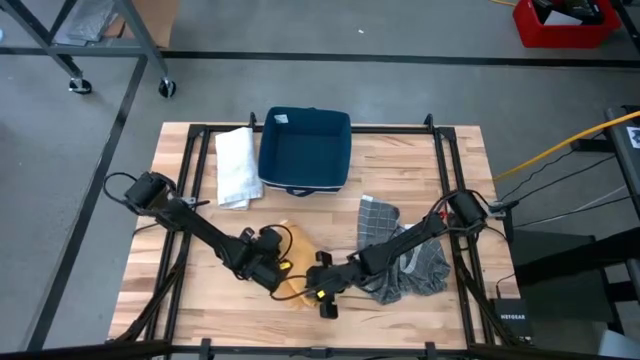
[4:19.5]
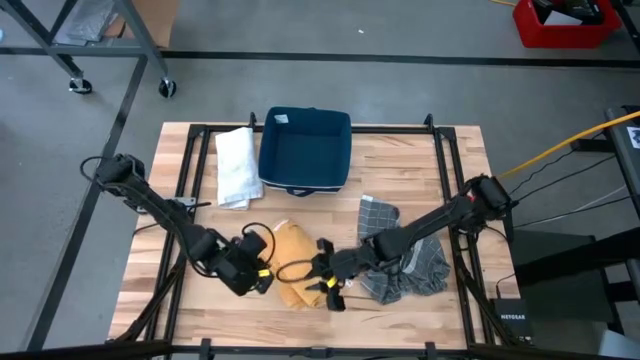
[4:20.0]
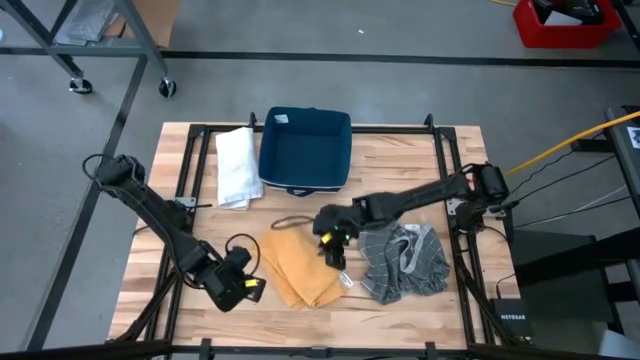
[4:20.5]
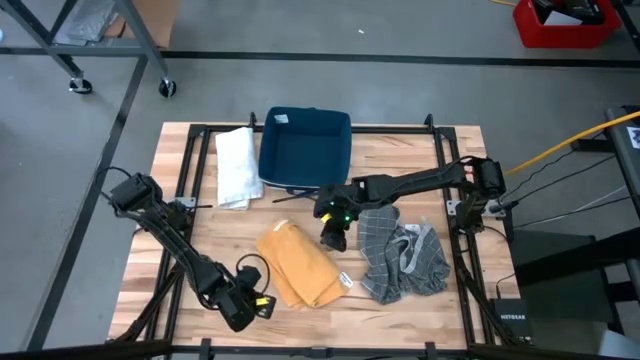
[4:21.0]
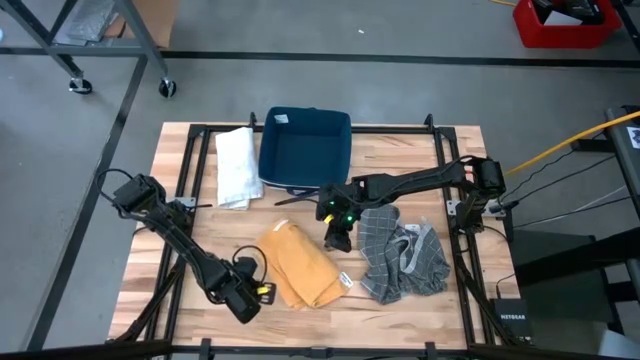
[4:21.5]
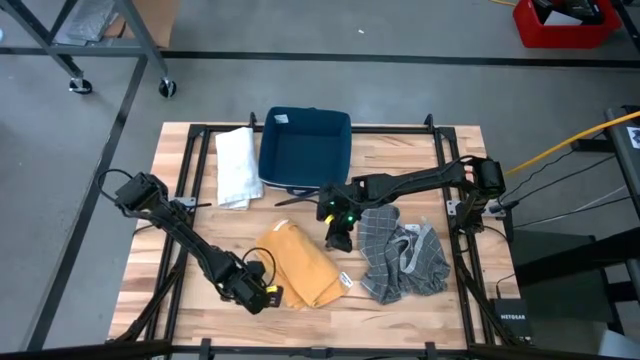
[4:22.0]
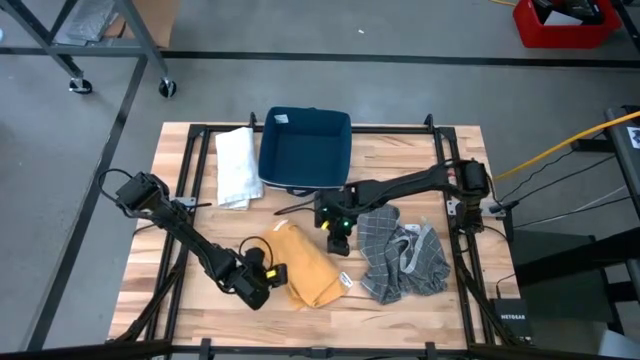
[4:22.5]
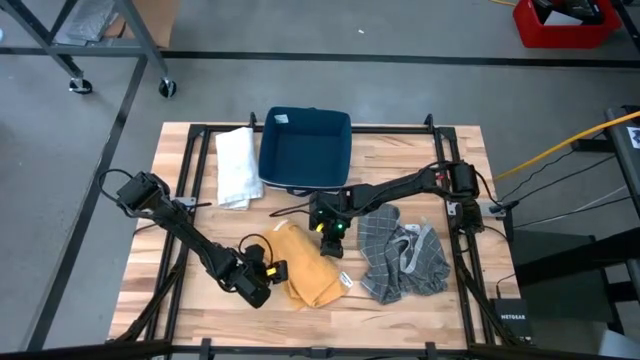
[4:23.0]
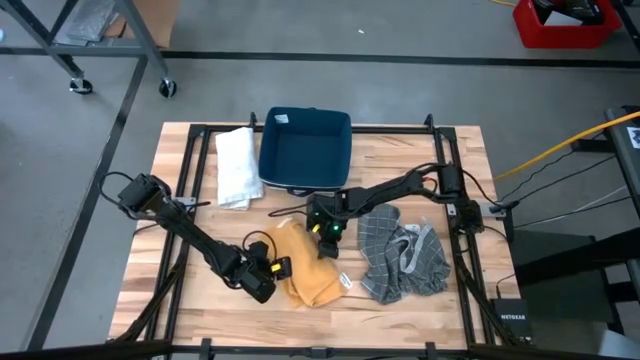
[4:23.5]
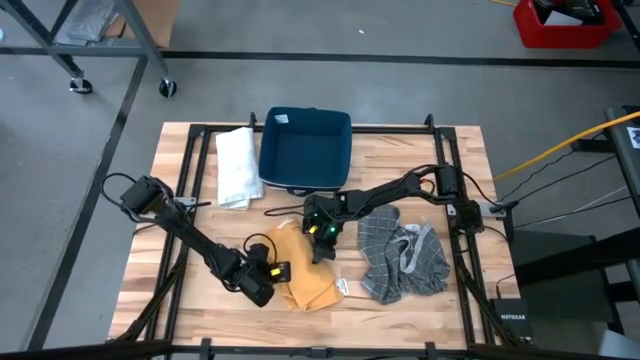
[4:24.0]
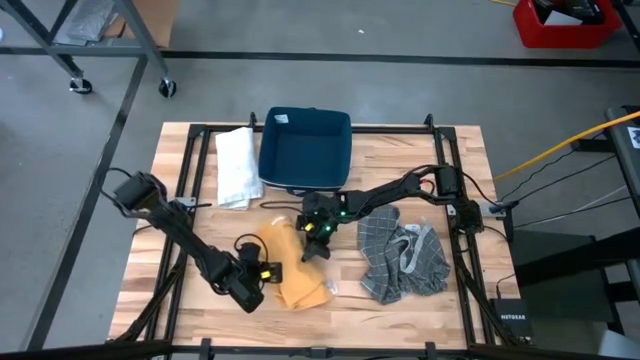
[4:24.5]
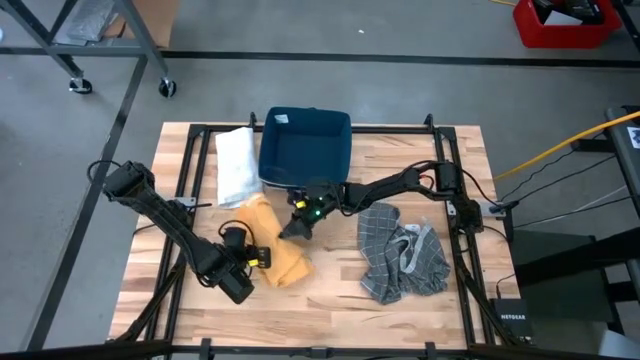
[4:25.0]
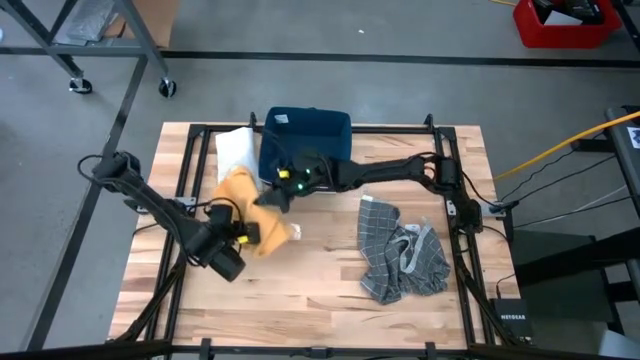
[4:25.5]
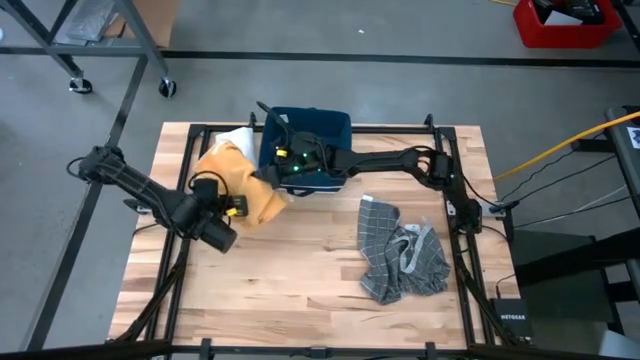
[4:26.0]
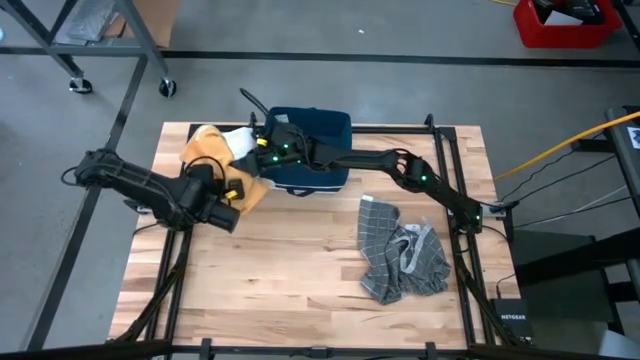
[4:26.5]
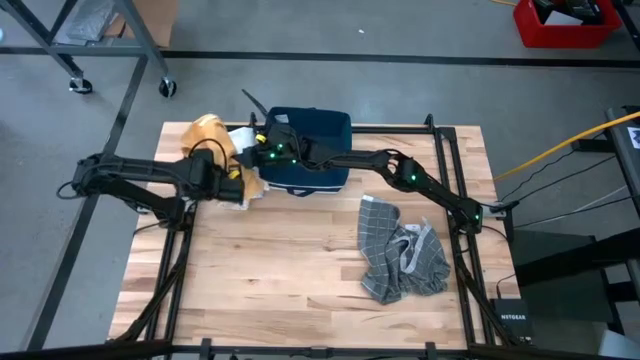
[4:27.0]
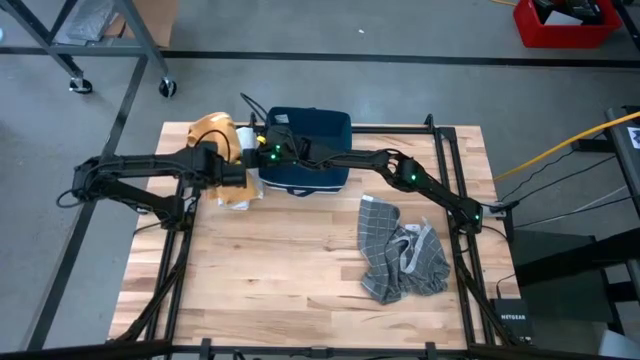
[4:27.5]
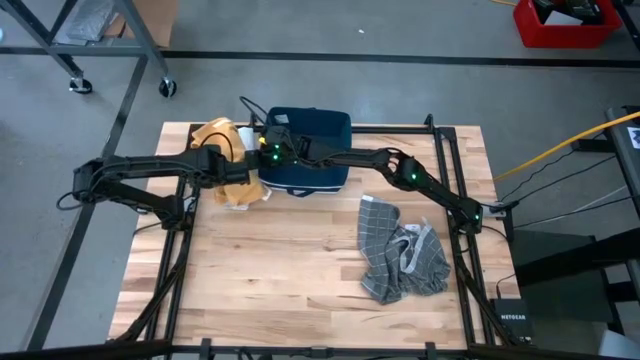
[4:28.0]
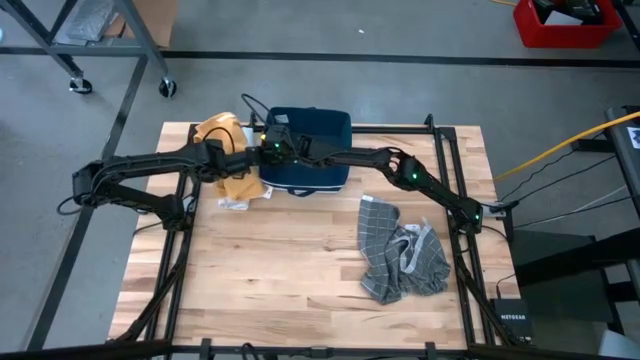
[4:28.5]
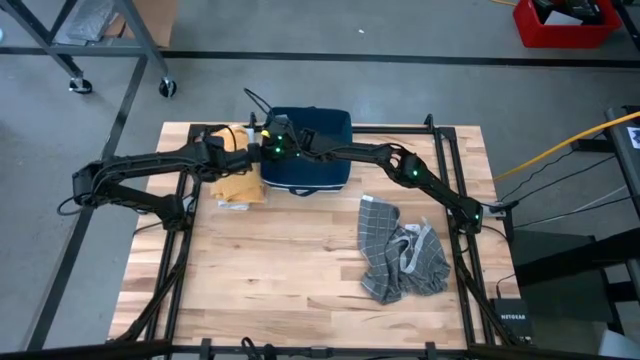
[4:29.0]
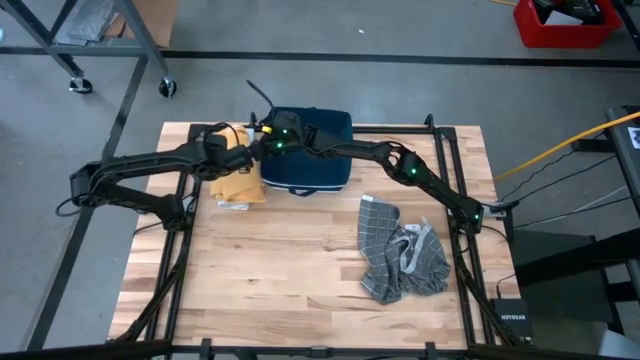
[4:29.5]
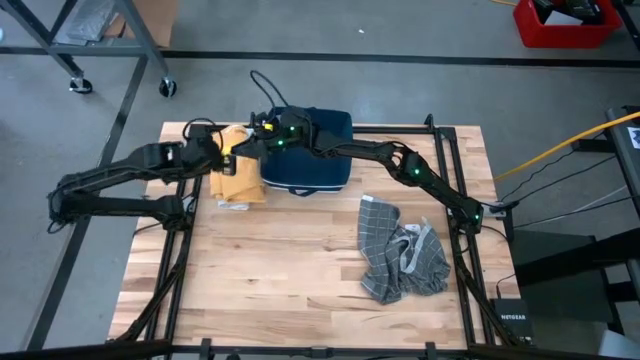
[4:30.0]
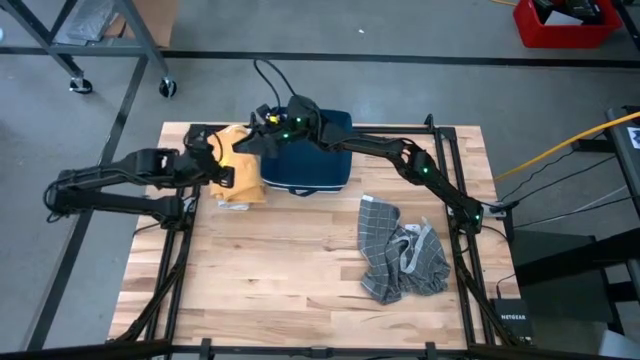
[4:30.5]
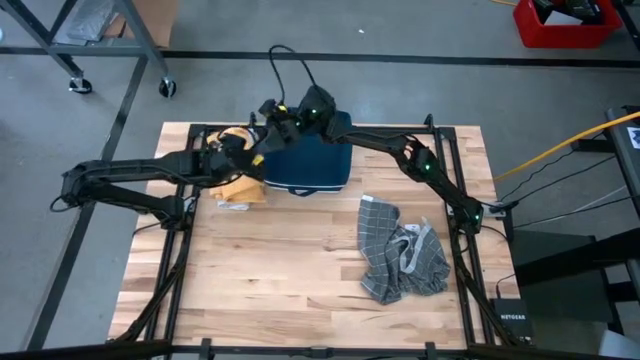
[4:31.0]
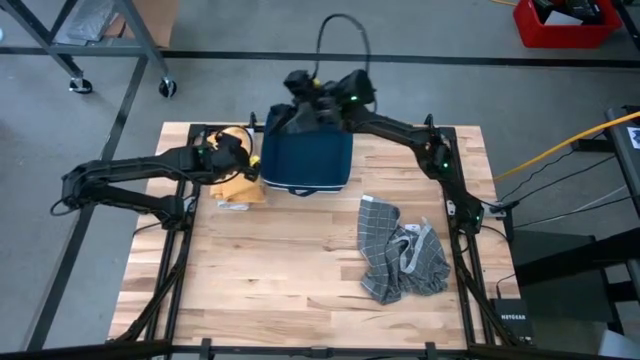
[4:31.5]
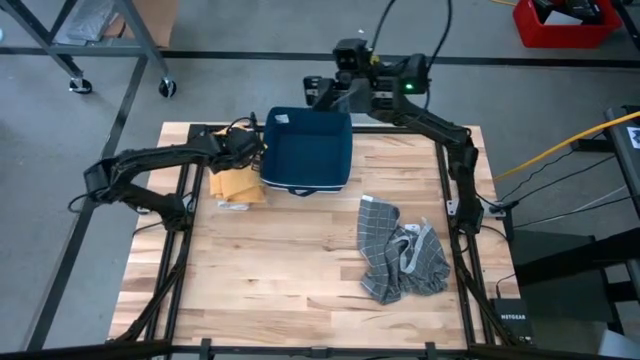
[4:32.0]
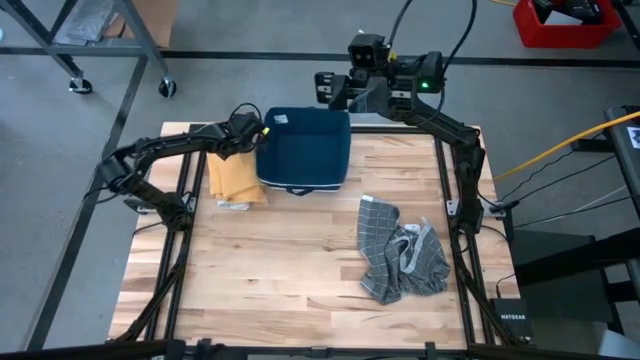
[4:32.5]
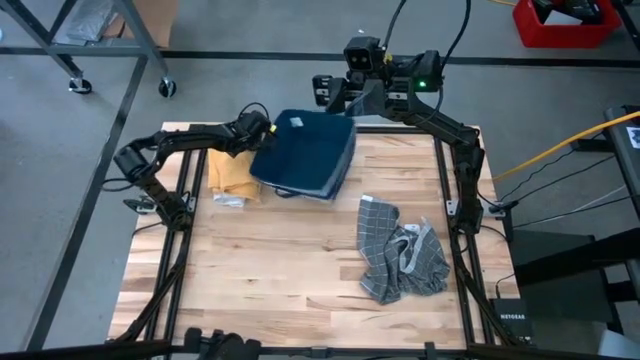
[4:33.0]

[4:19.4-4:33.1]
Task: Fold towel
Stack the yellow towel on top of the white patterned towel

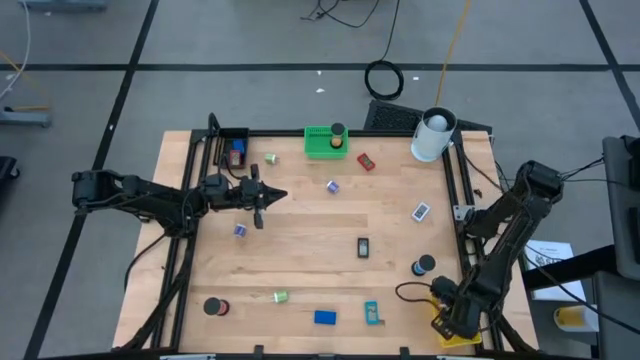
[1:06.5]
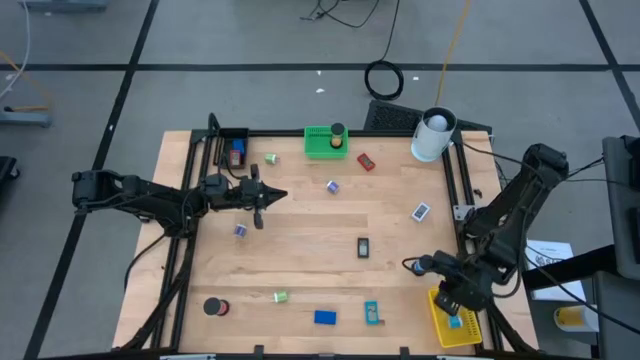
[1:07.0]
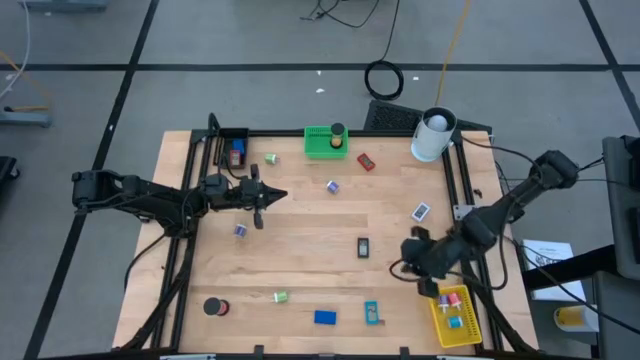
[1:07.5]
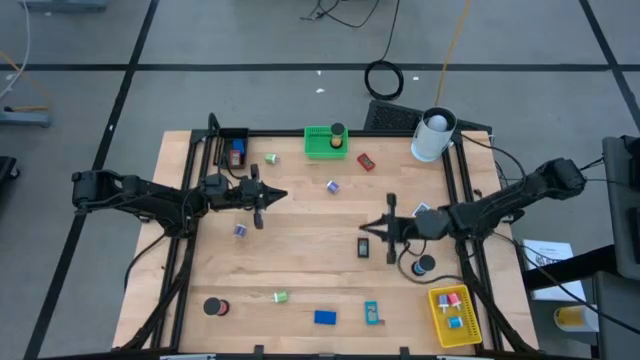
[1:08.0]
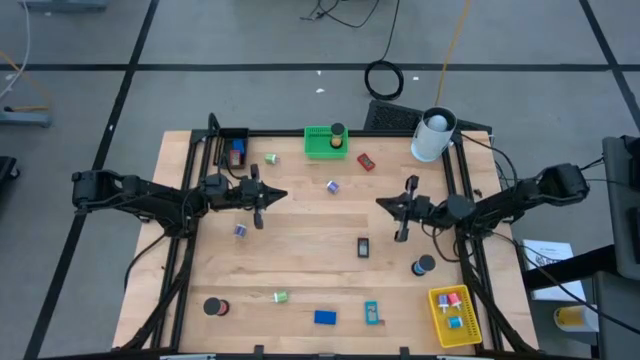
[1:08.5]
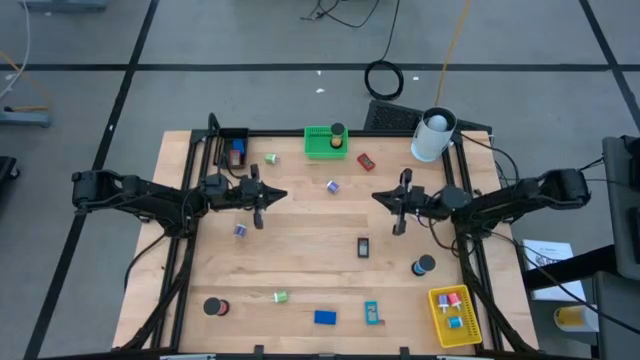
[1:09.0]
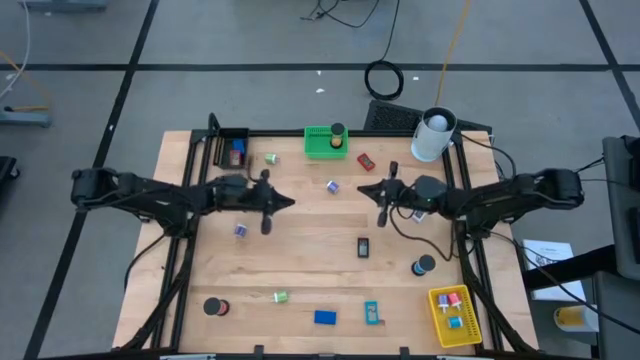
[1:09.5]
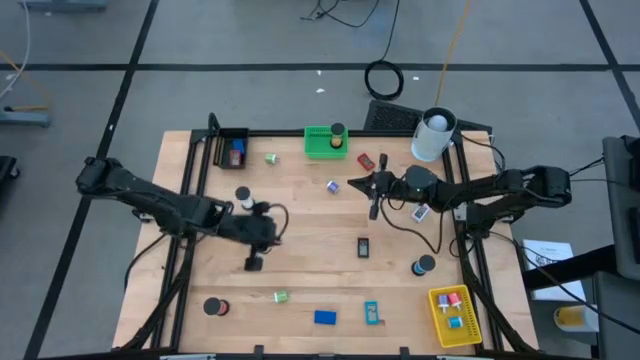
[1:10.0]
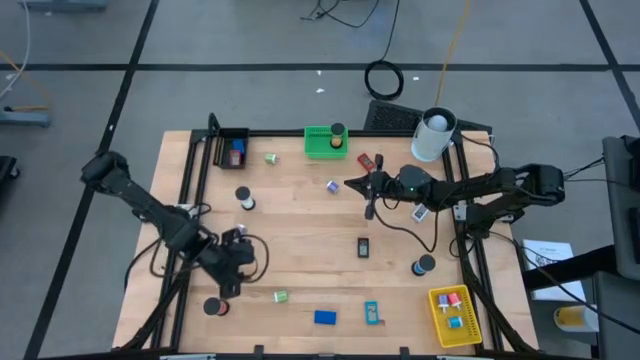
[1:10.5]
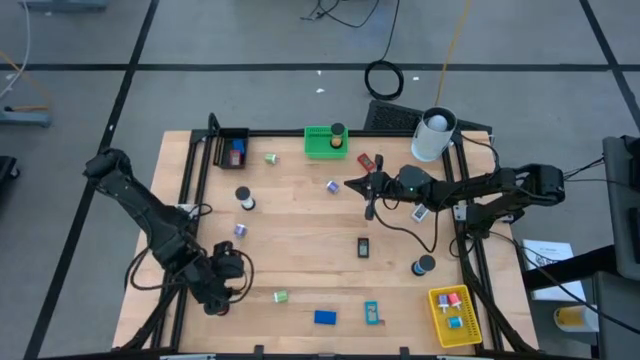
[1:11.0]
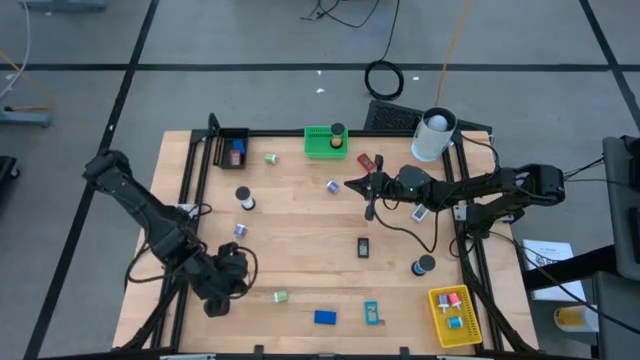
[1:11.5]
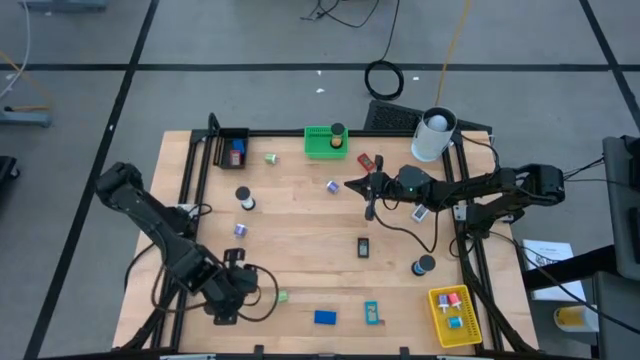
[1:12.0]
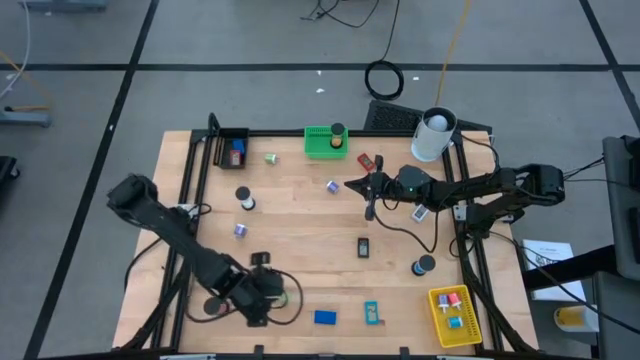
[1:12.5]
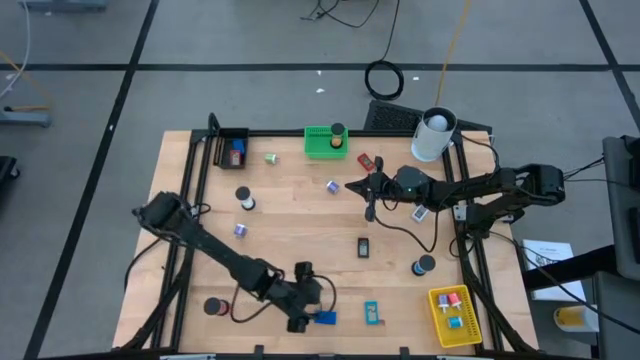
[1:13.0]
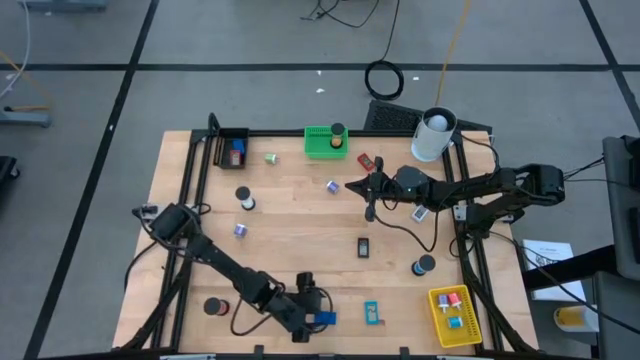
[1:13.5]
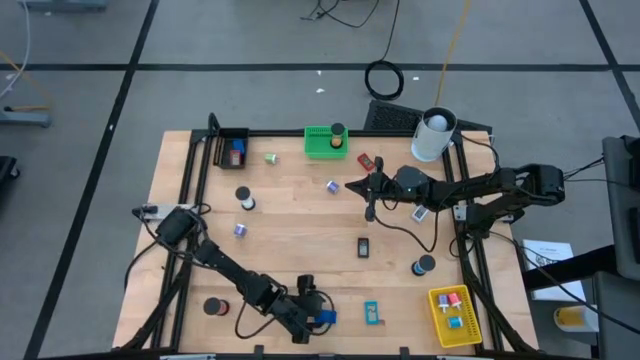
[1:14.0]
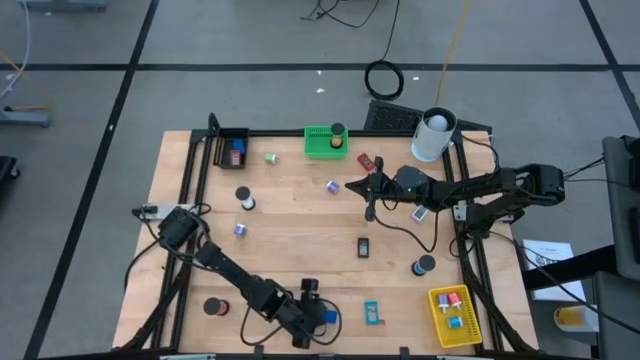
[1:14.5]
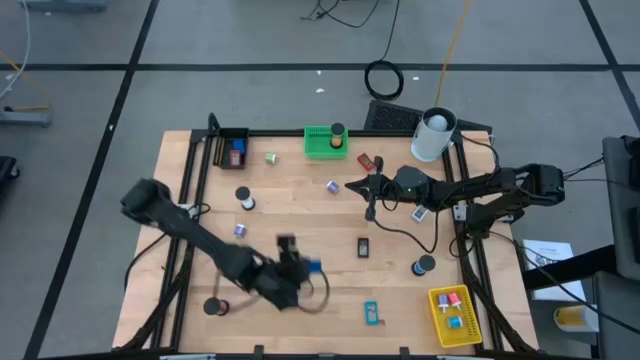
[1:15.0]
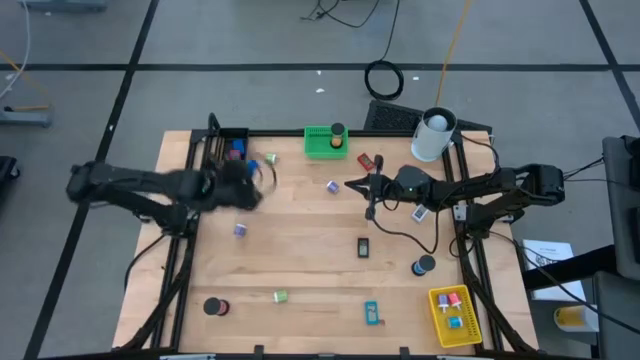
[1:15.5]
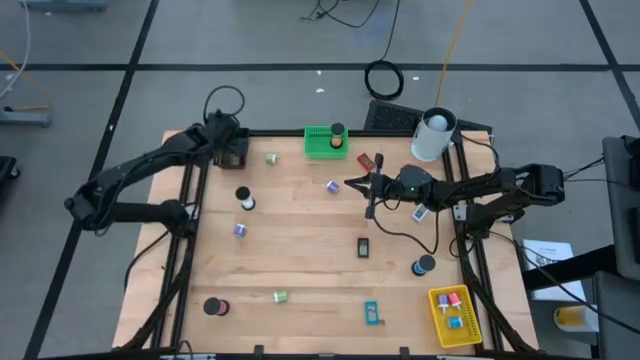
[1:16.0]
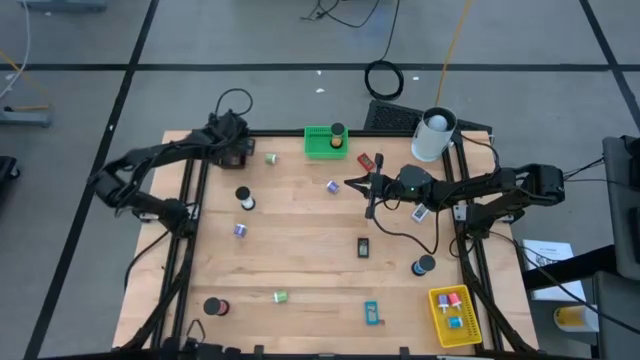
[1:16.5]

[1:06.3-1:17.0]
Task: Pick & Place Office items
Put the dark blue digital clock into the black basket
